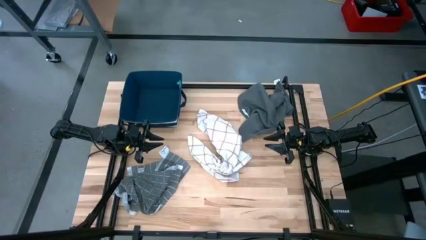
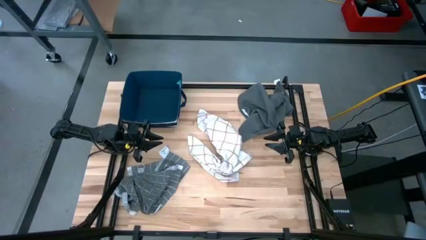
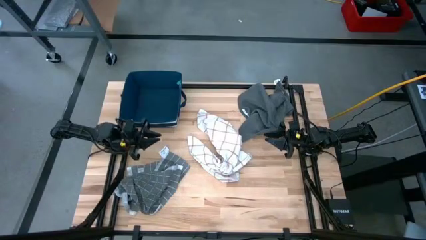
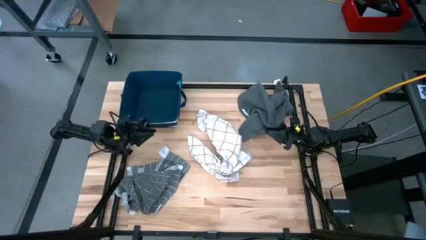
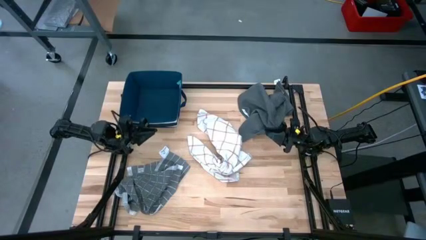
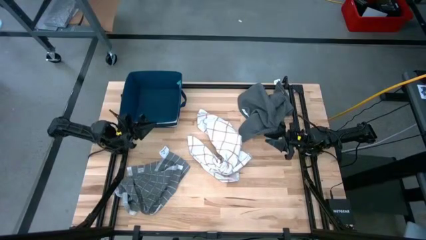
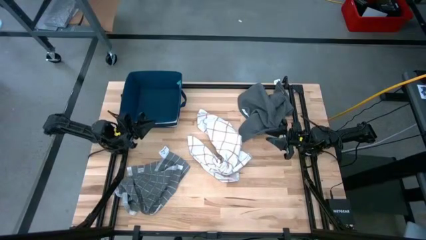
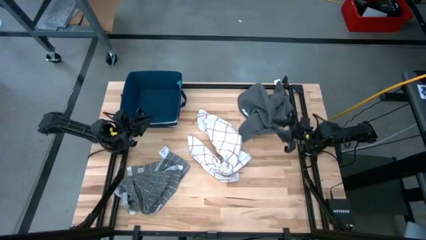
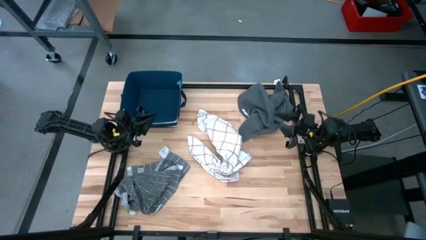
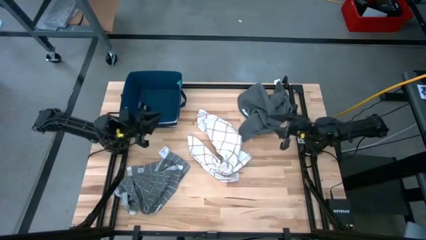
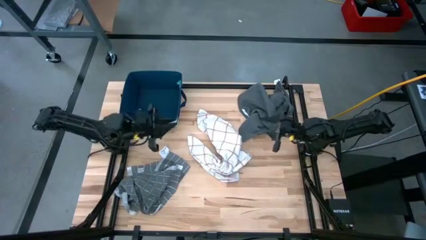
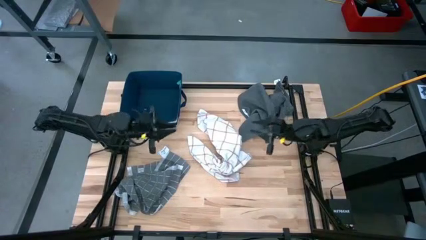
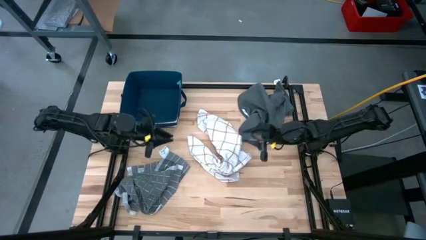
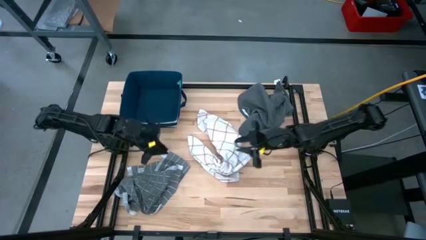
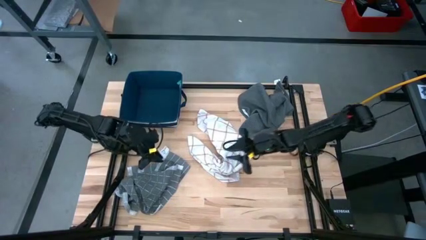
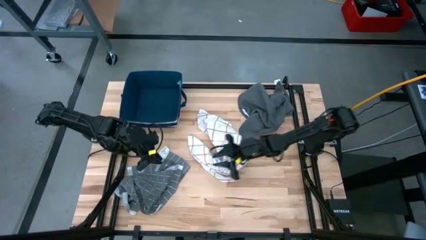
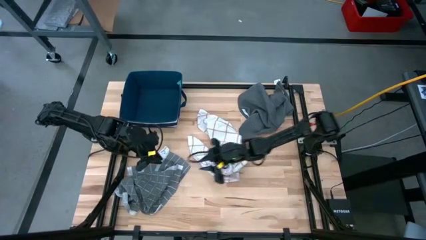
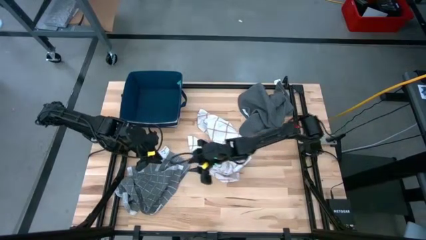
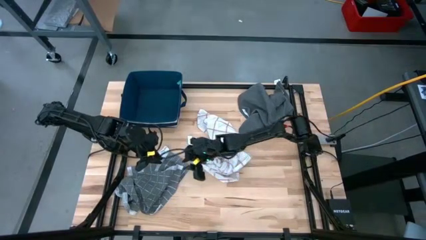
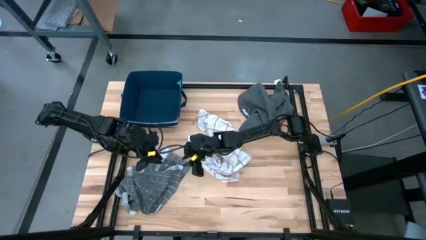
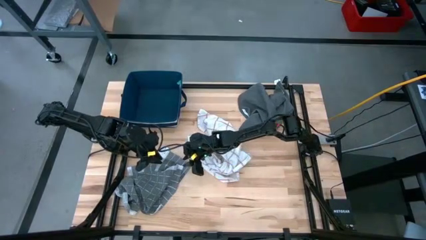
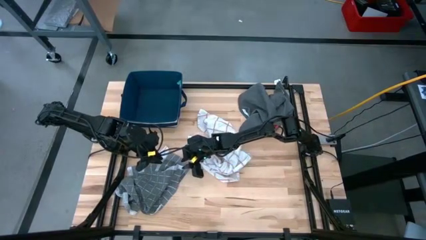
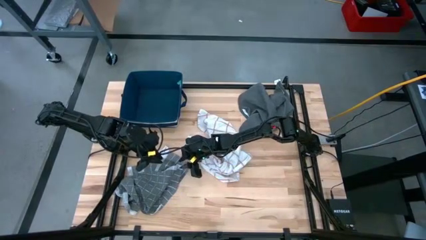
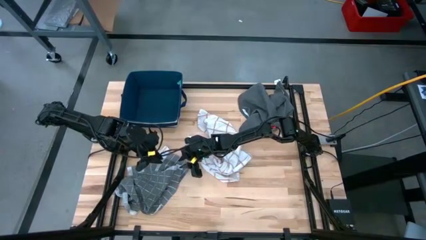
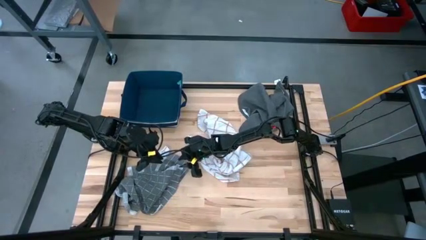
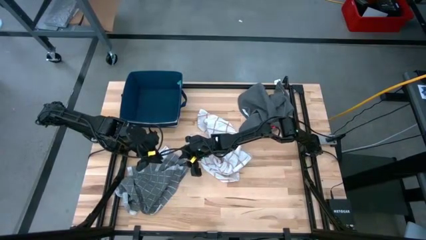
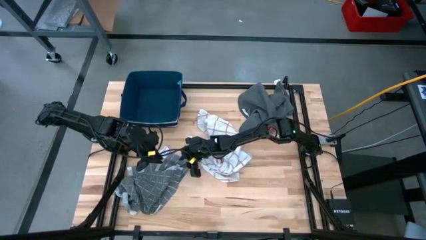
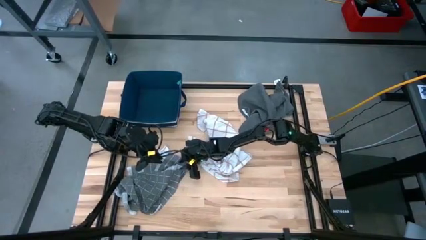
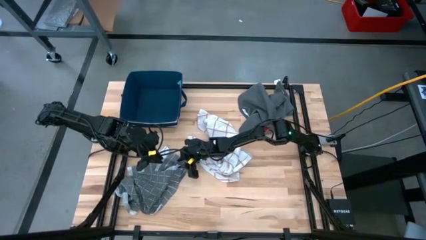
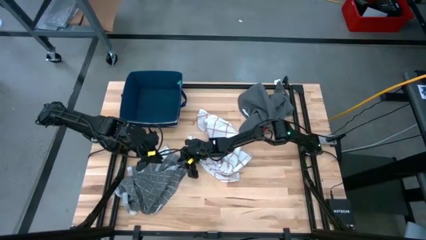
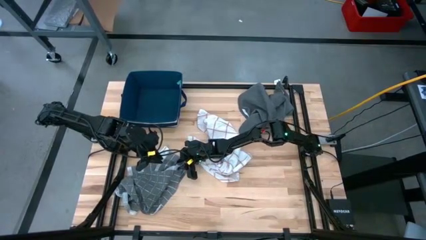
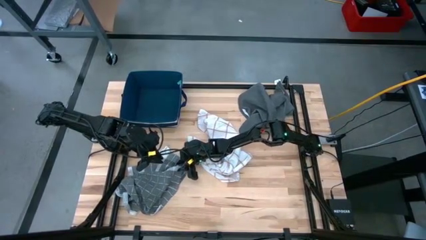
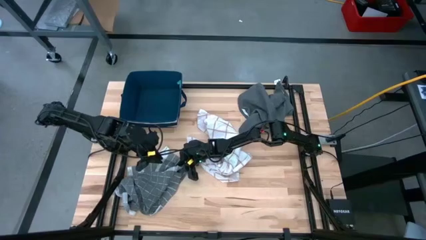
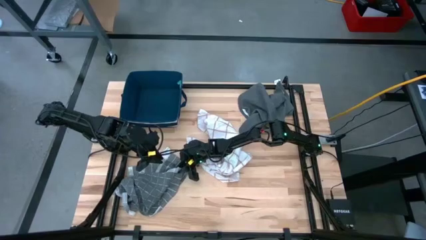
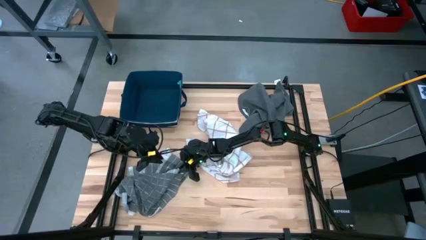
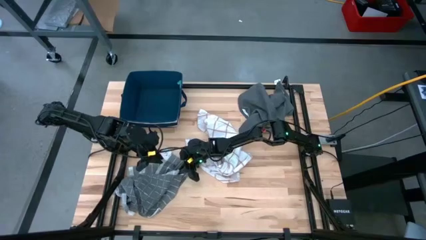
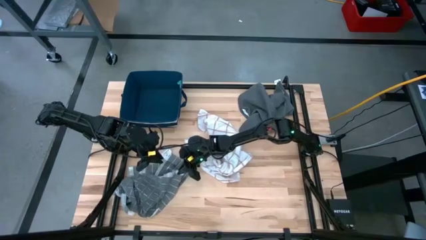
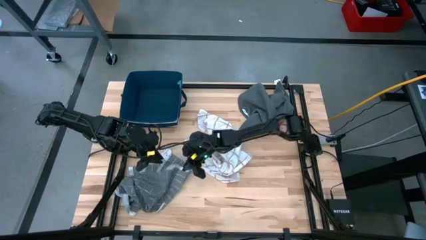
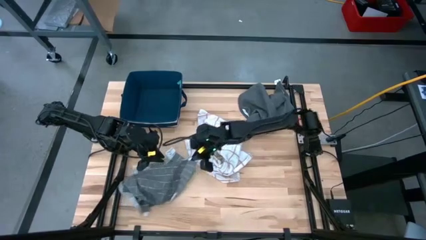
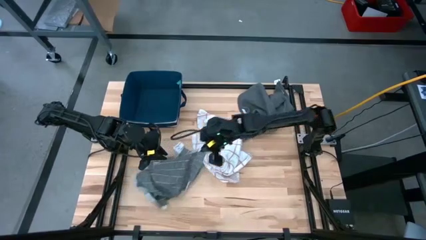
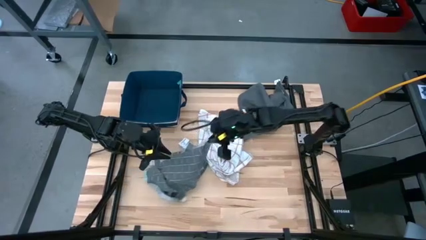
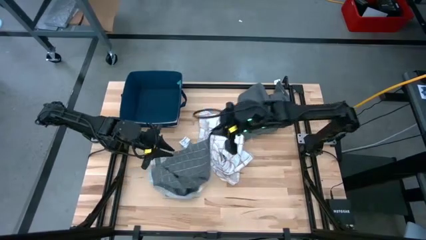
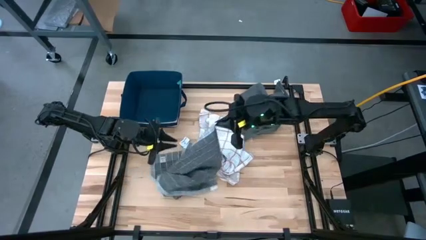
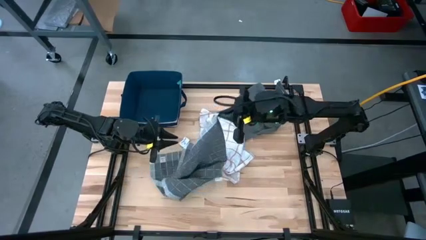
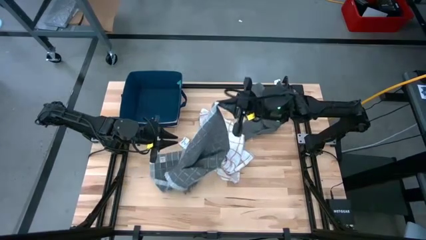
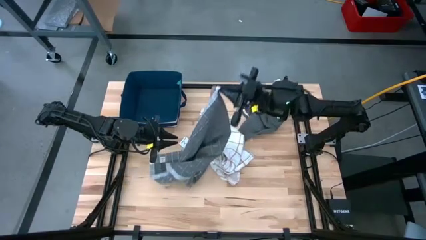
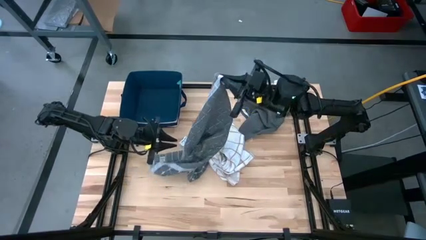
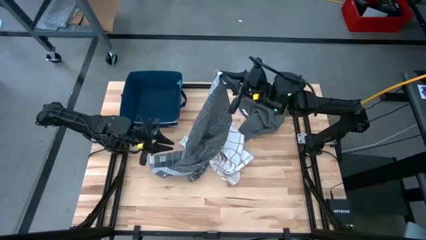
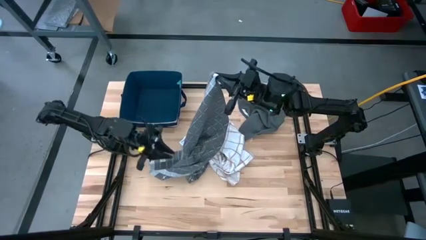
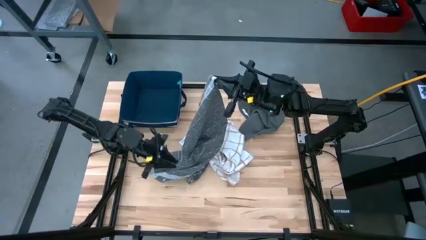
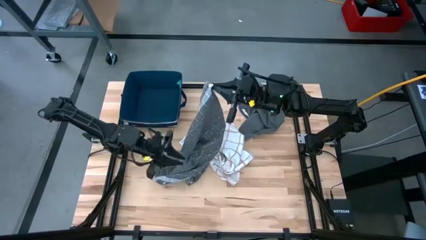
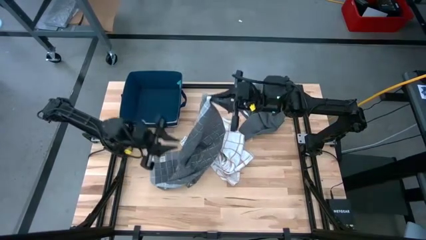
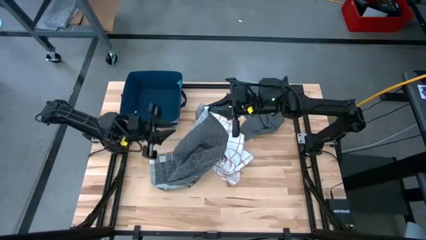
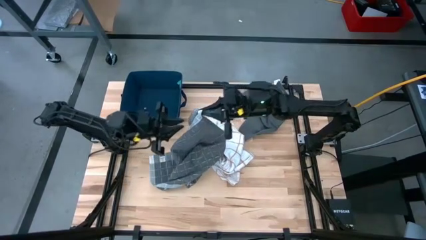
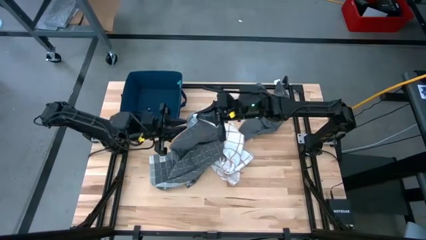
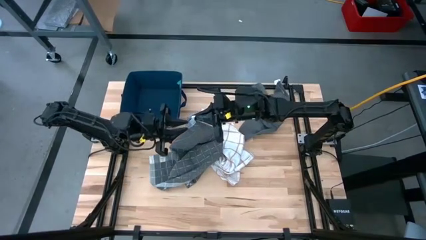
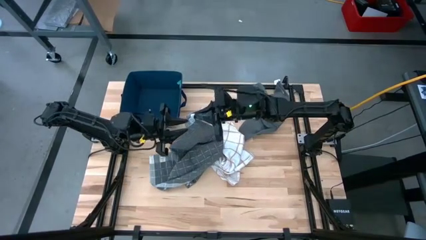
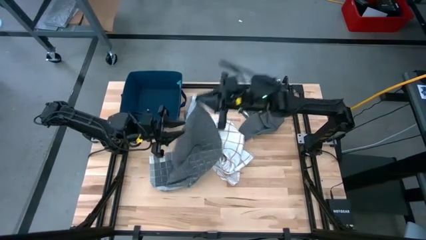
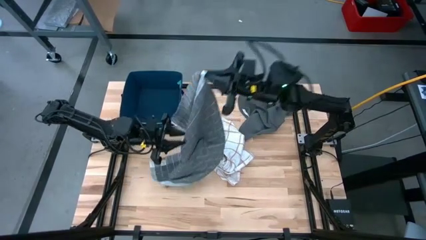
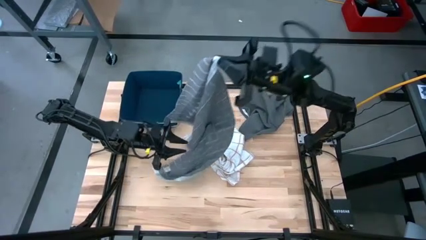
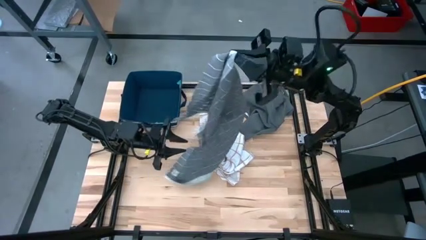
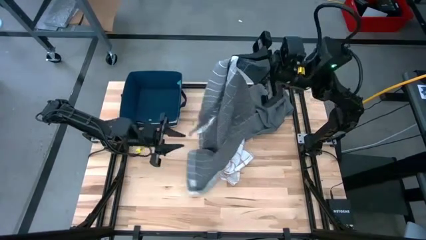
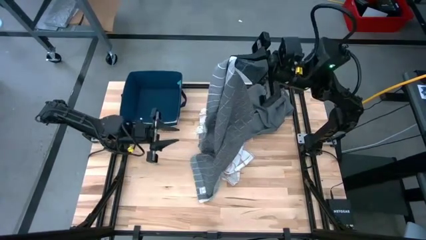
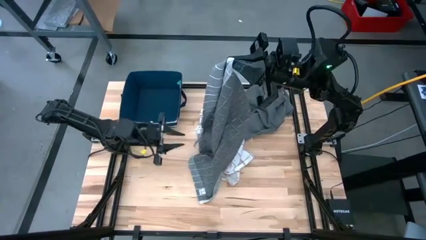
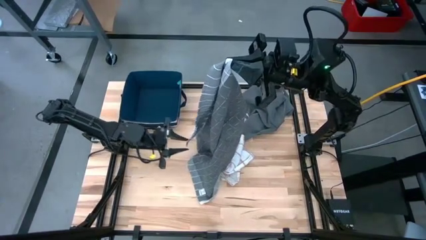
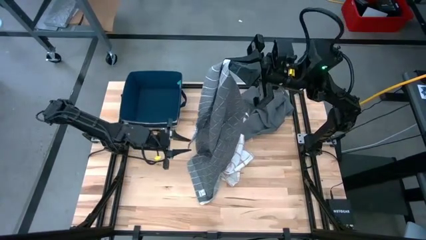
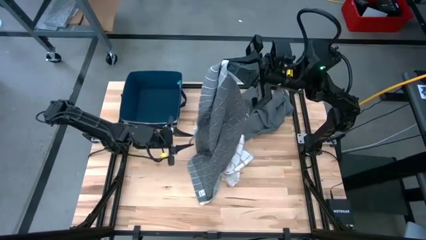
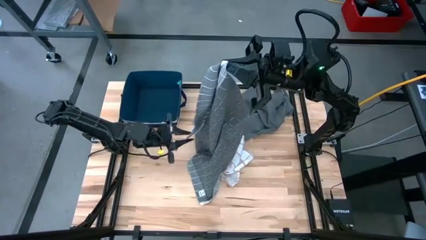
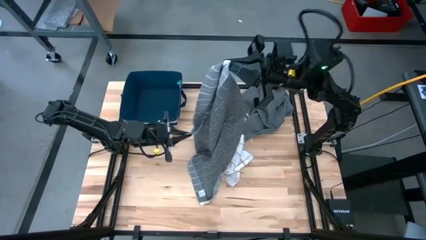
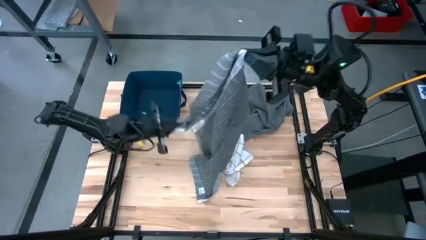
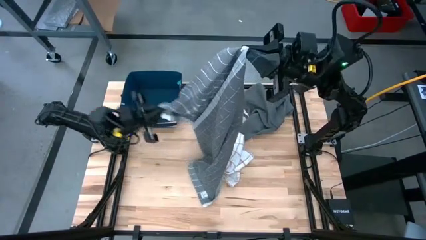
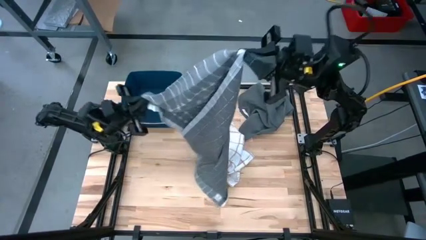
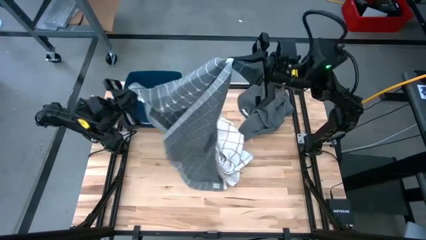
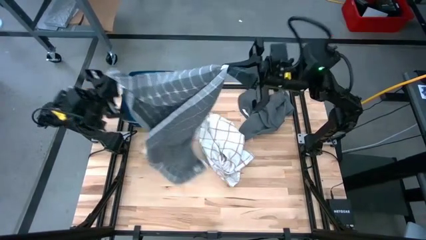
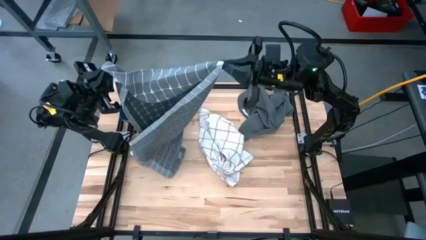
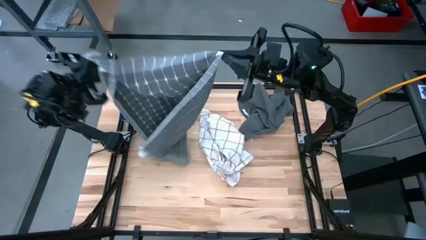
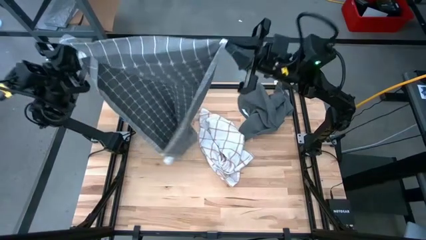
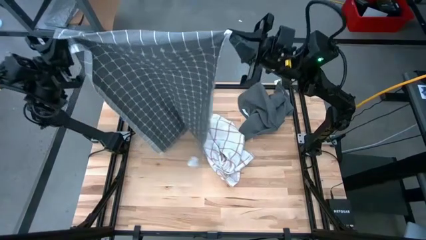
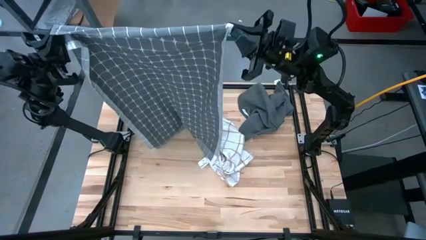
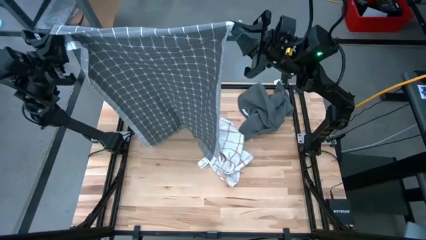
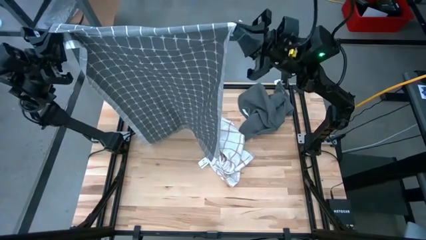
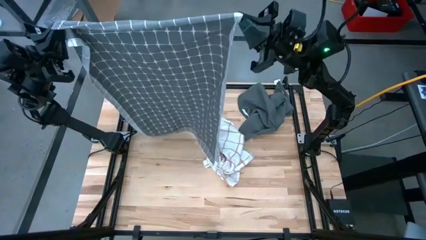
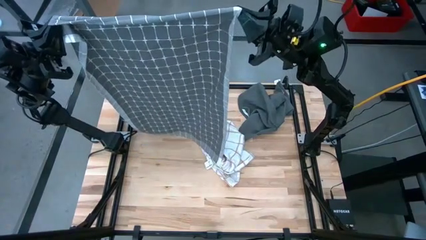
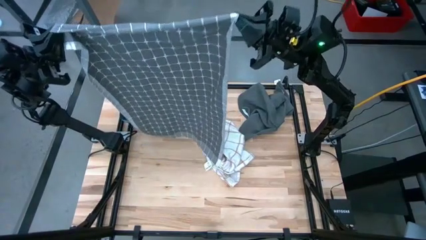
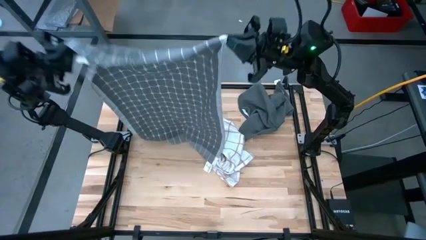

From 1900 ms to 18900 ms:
Task: Fold towel
Fold the gray patterned towel
